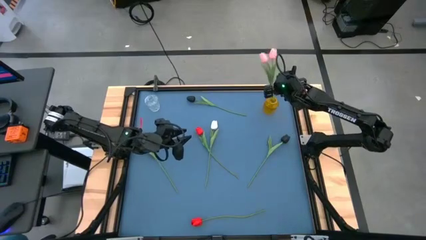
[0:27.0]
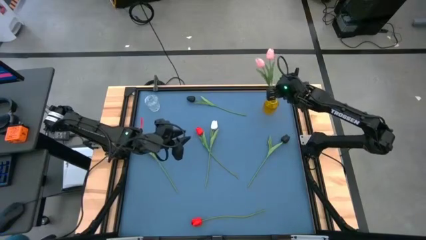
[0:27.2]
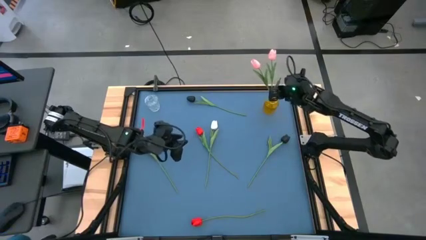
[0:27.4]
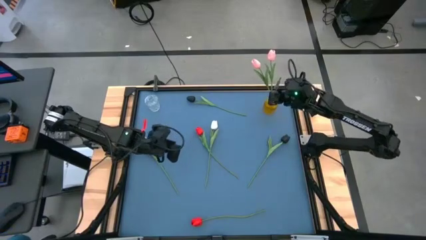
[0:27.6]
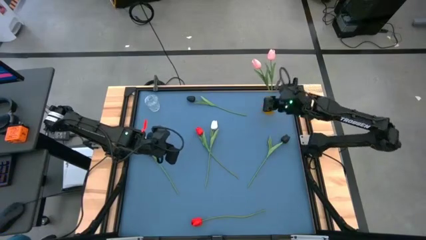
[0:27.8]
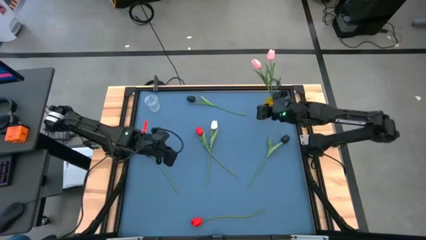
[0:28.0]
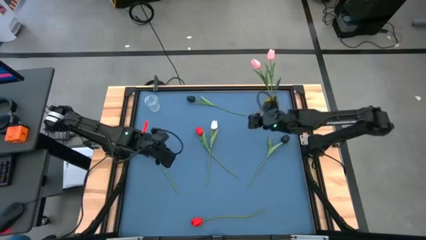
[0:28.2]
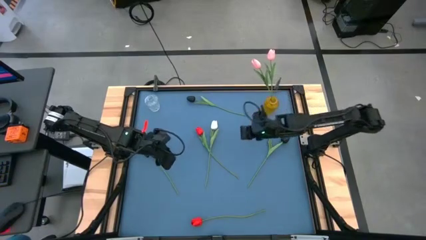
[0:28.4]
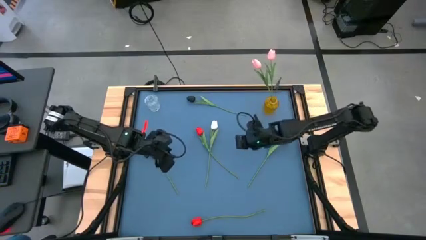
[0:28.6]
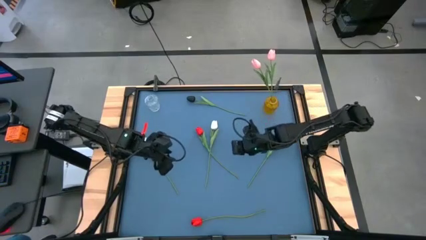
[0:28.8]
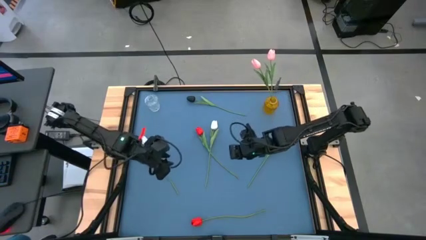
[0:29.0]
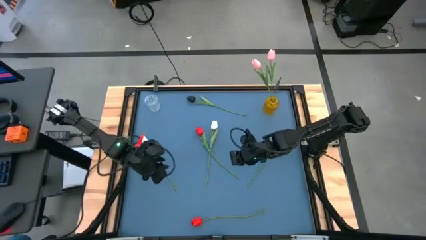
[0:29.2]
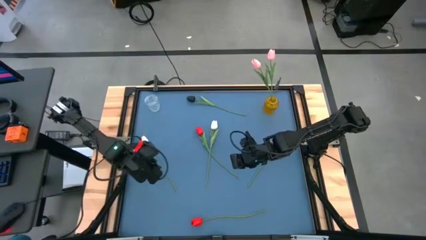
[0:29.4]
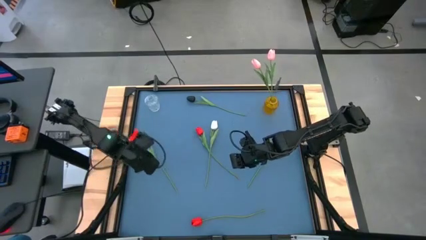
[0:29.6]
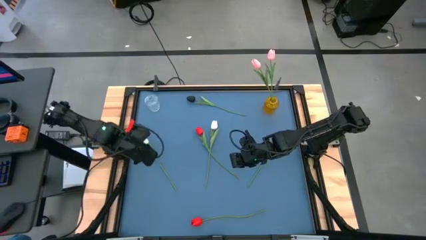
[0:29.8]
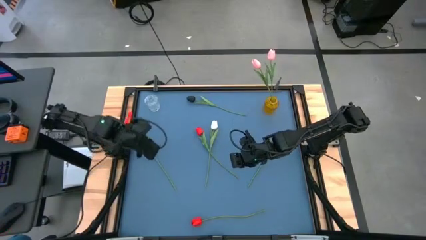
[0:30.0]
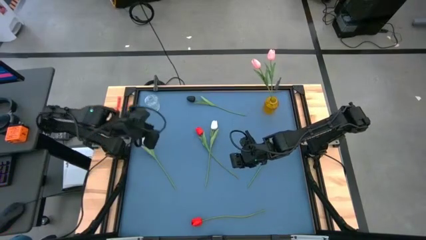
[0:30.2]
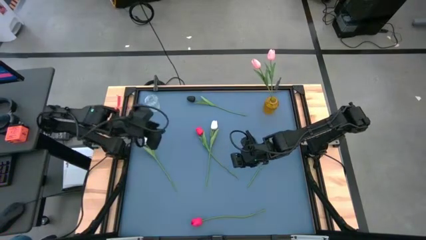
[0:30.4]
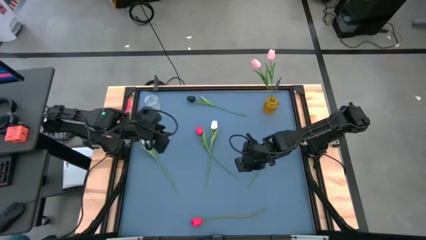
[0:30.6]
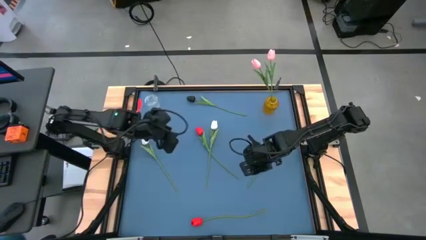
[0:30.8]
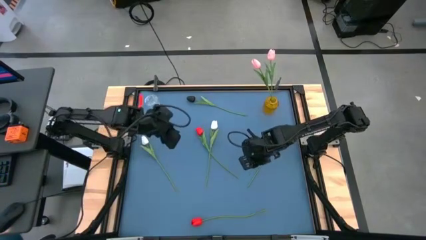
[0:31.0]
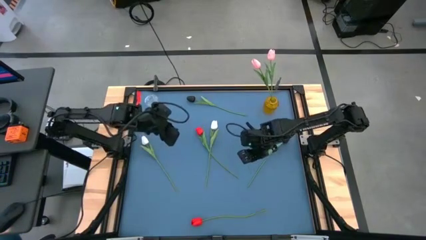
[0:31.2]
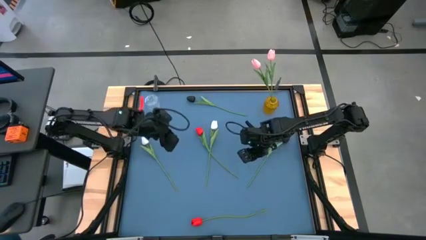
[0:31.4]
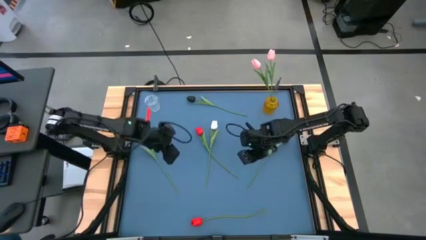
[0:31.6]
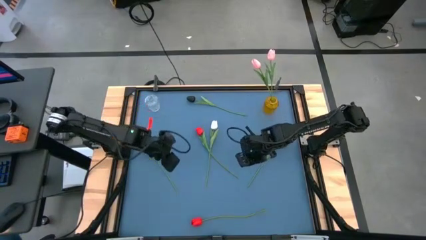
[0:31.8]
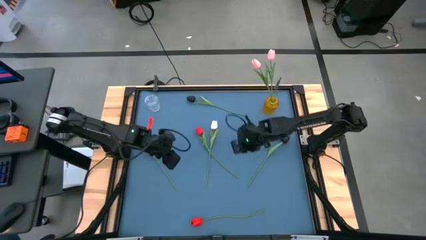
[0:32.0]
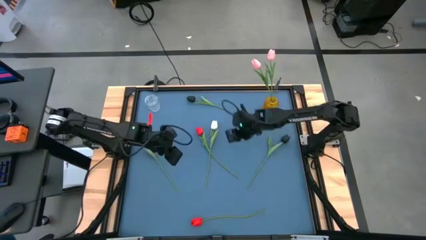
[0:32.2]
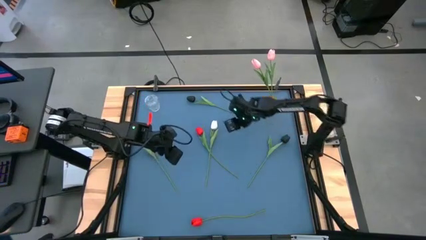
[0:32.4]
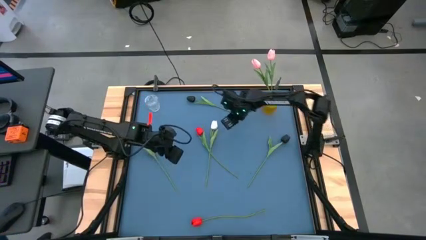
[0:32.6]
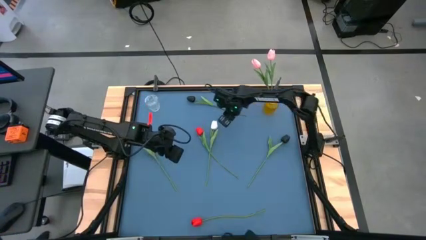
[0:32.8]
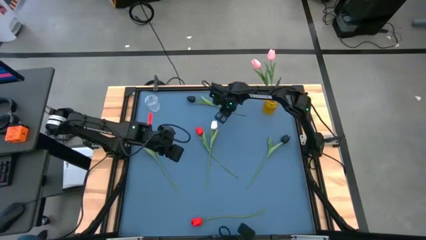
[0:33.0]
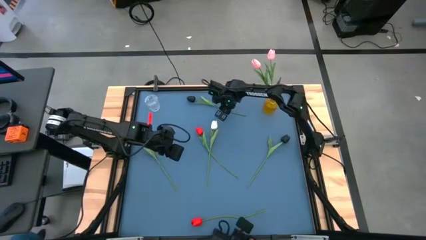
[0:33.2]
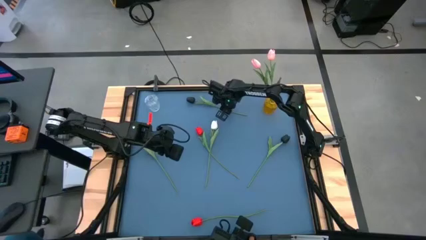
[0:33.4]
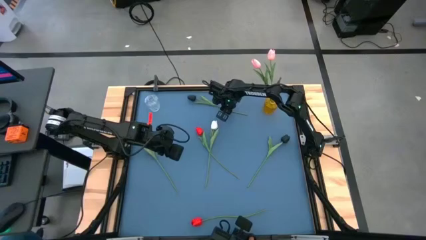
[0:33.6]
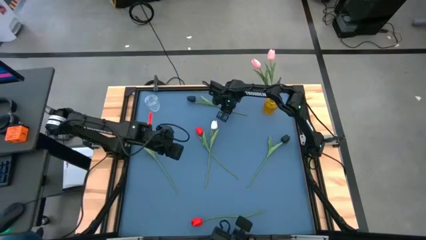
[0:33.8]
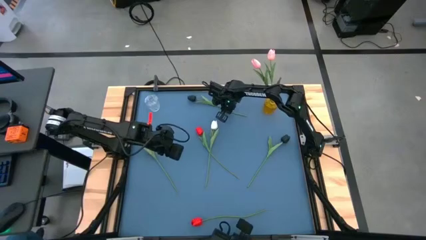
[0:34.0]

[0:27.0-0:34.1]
Task: Sort flowers into vase by color
Put the top black flower into the transparent vase

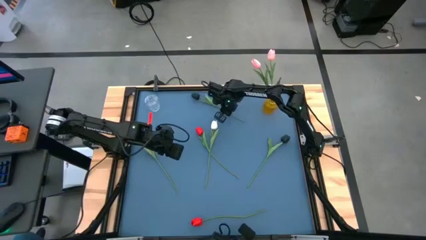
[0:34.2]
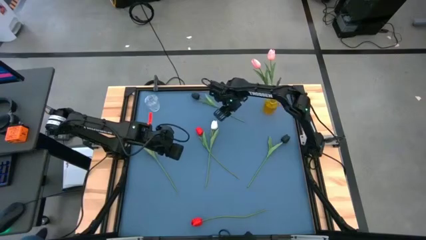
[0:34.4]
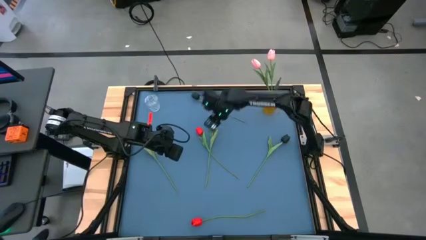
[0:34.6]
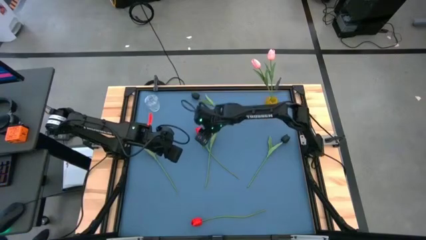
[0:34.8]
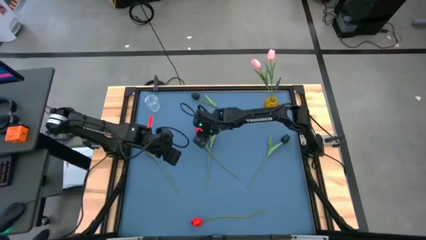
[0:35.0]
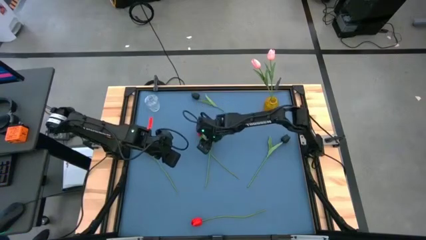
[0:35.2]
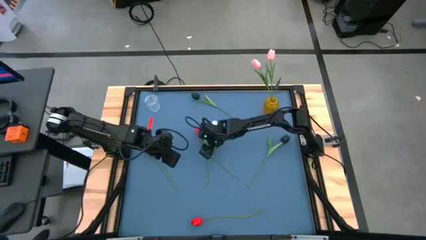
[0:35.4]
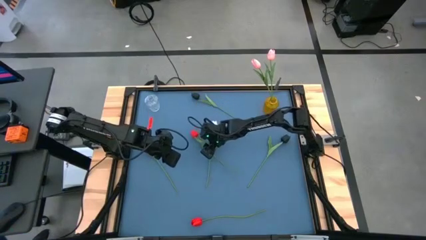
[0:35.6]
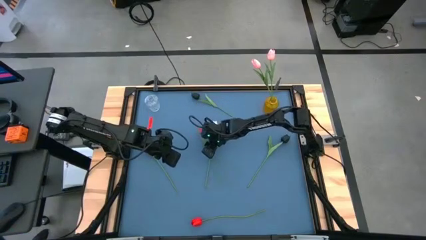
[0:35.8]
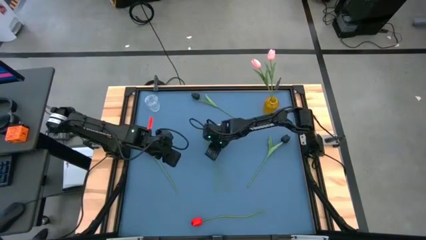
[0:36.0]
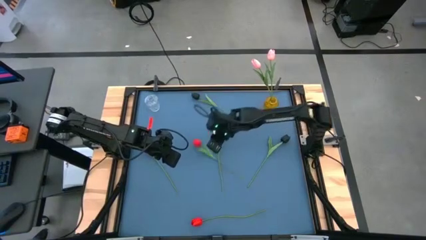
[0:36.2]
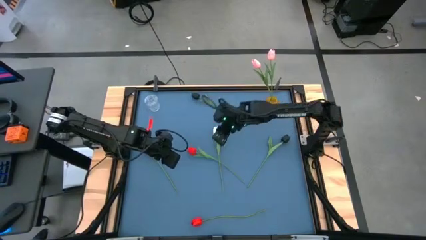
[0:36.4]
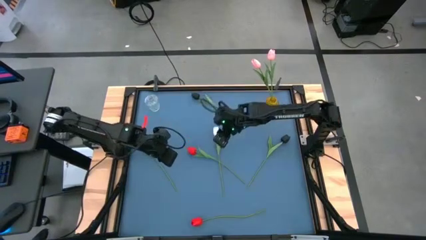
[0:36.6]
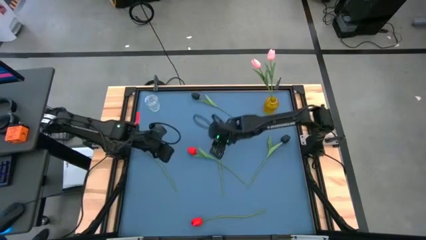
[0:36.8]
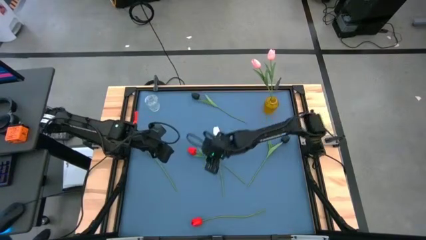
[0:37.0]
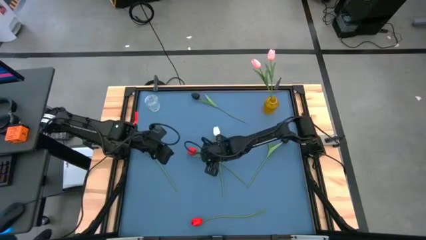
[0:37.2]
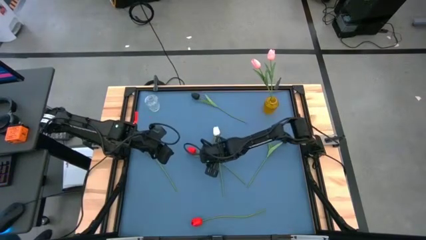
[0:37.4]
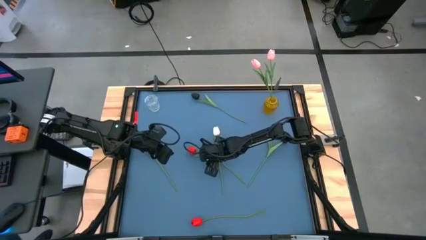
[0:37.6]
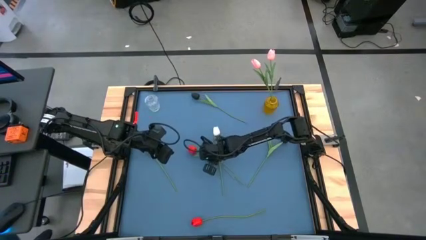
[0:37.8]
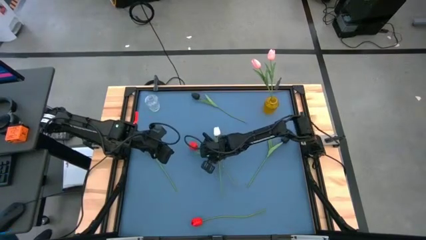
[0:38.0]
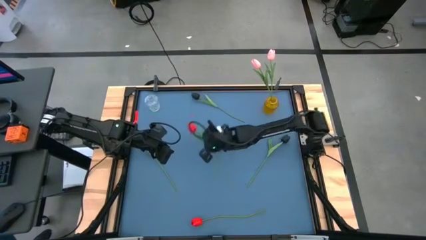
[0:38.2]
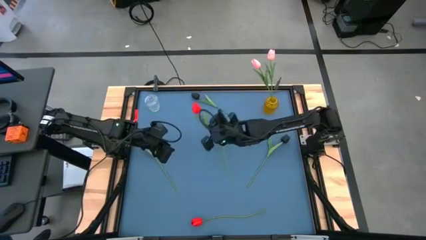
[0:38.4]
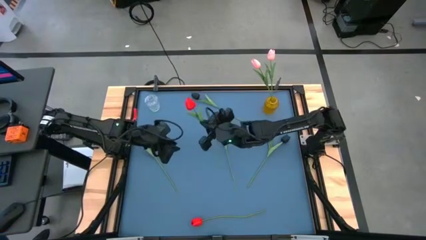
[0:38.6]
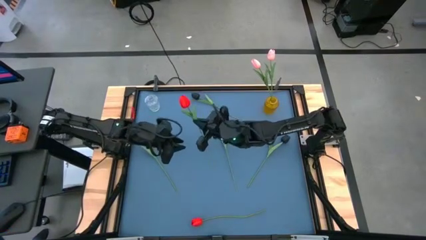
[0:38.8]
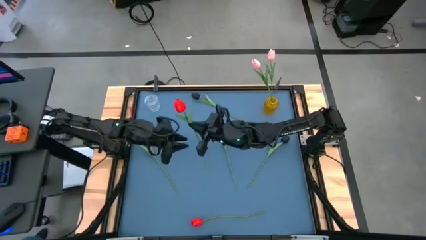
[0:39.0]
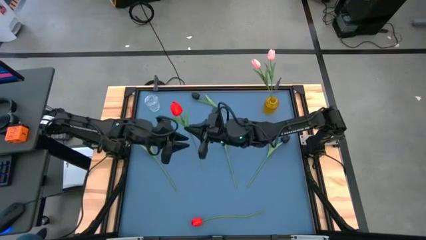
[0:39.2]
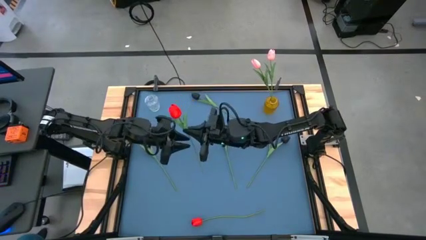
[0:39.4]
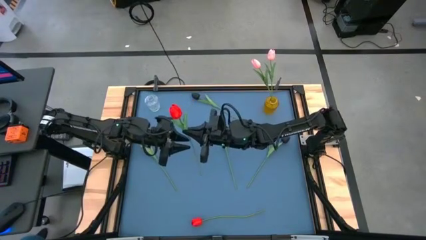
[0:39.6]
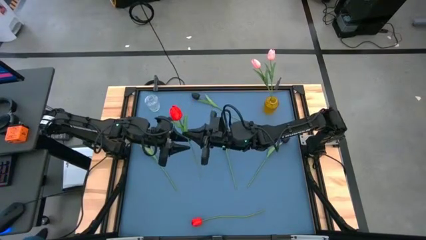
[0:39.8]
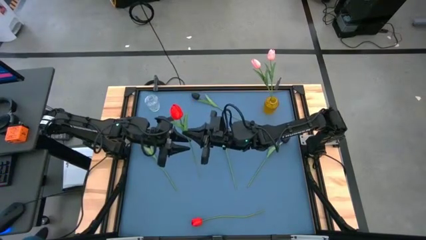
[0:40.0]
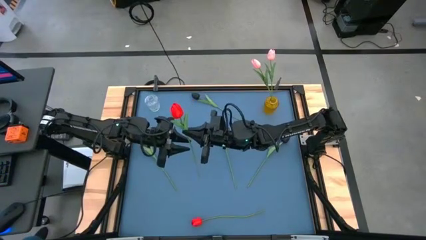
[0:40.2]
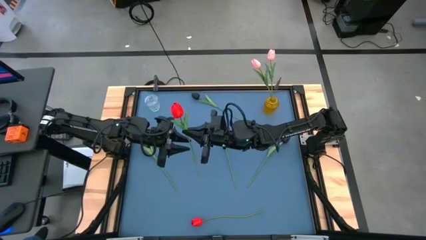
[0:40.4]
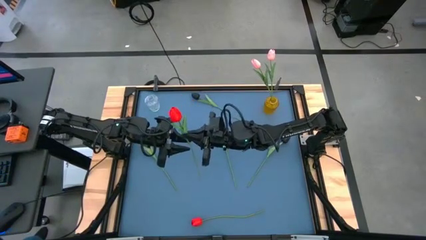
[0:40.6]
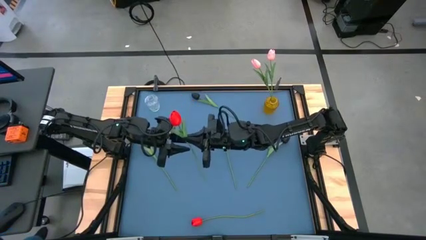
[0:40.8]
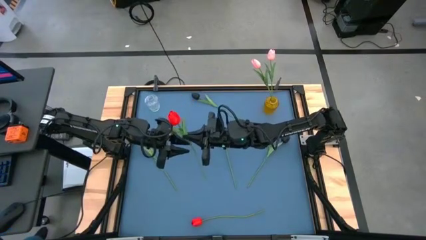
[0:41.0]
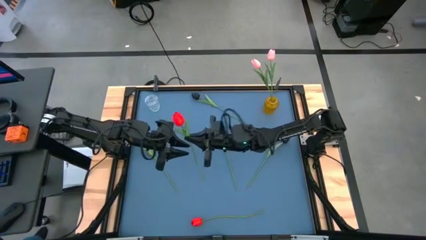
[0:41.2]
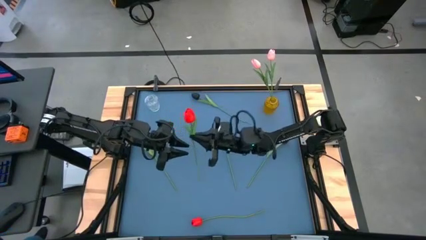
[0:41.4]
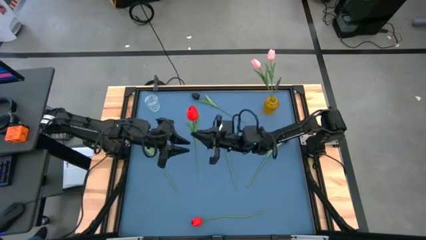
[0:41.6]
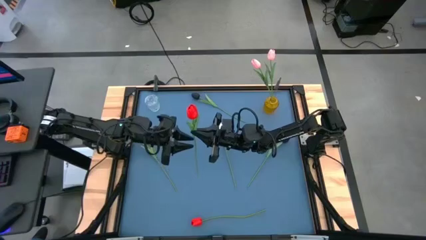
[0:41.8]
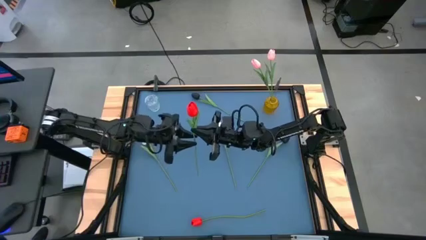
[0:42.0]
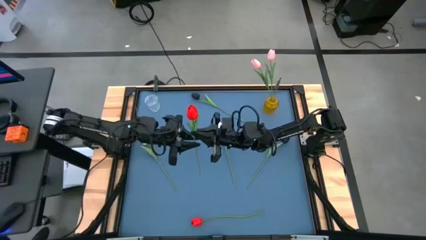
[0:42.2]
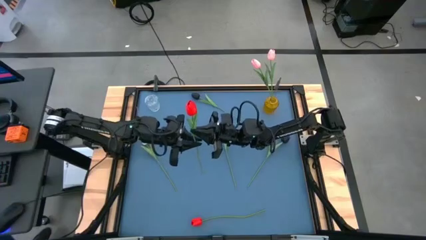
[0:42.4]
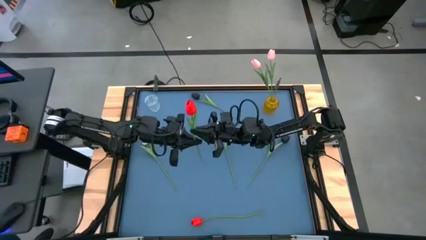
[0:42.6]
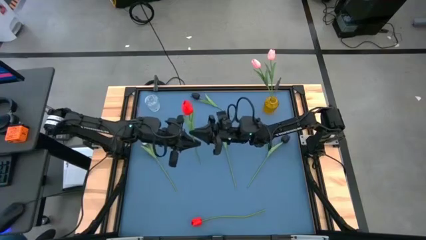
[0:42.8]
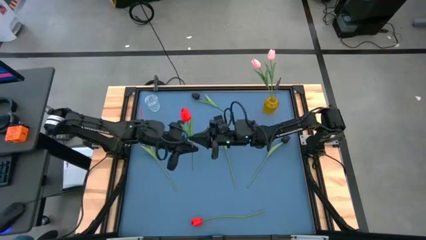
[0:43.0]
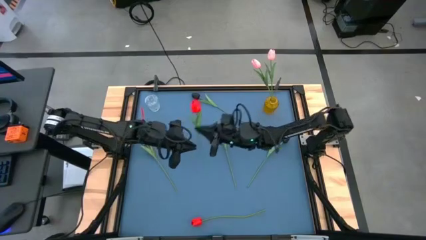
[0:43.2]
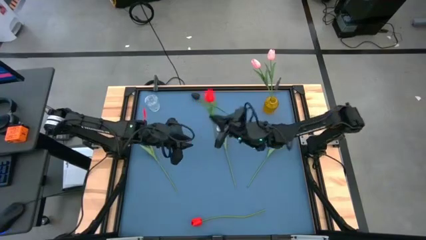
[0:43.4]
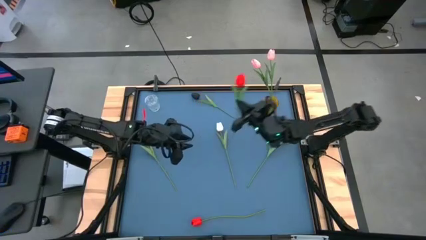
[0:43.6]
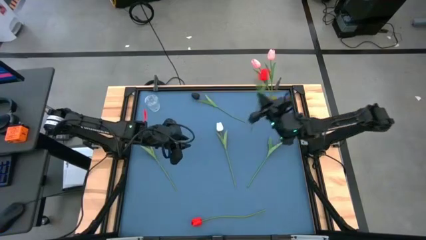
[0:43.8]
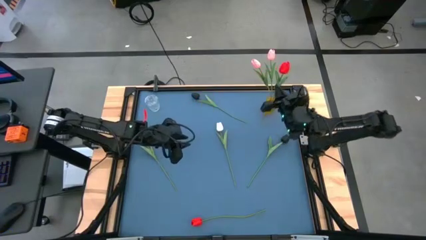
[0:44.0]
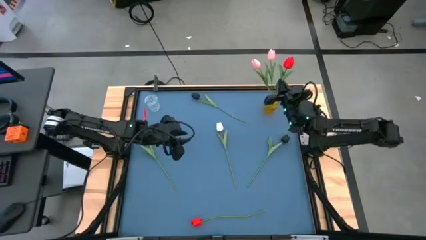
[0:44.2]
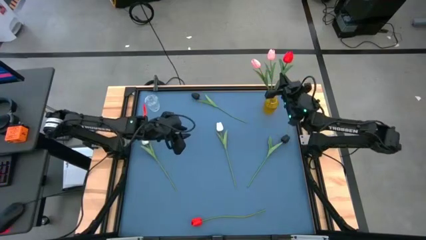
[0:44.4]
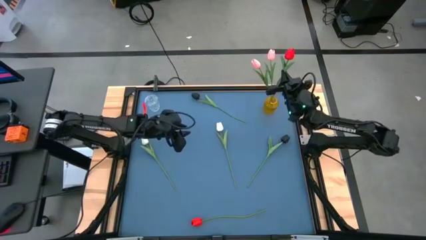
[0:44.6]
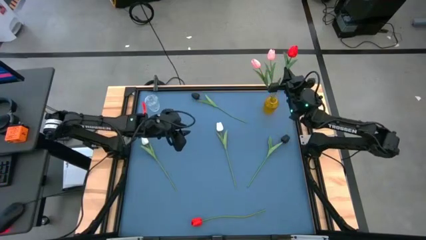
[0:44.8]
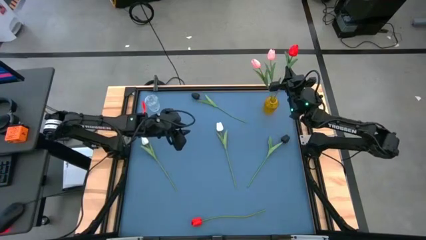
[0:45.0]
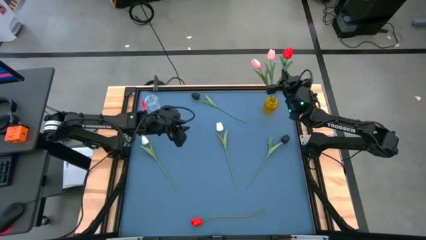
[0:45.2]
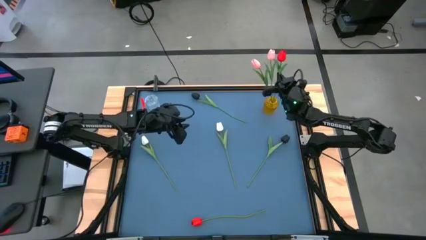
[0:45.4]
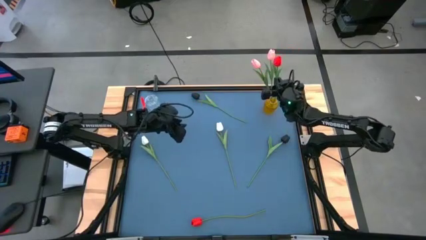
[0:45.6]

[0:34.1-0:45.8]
Put the top red flower into the yellow vase
